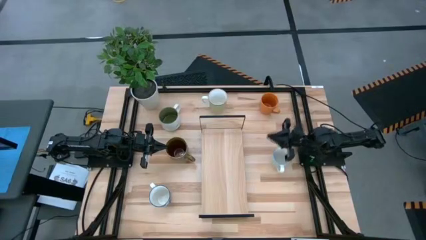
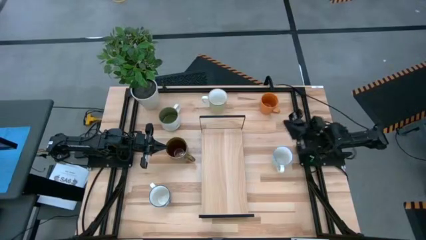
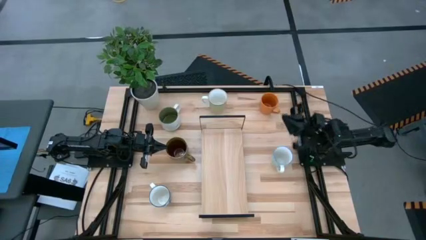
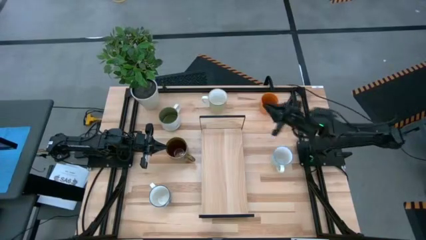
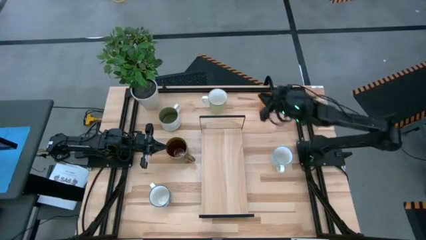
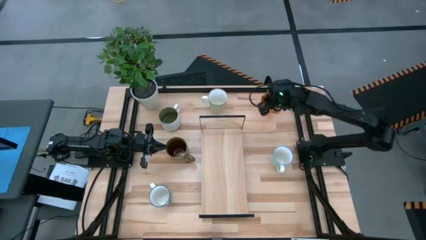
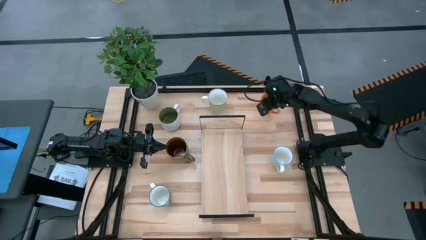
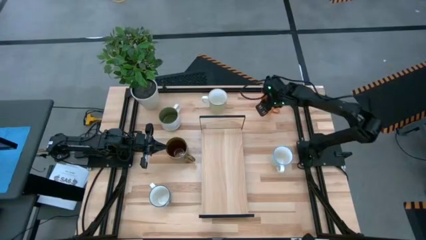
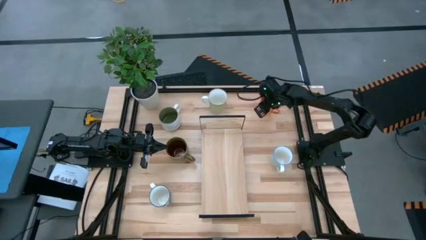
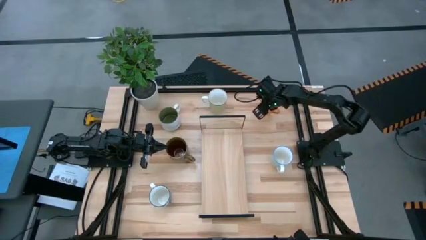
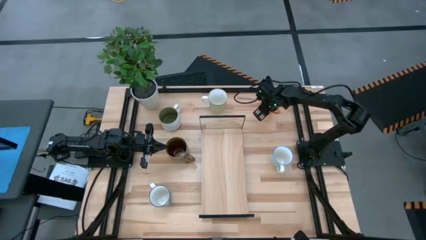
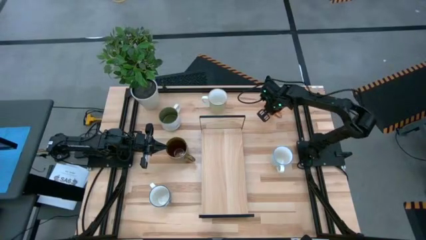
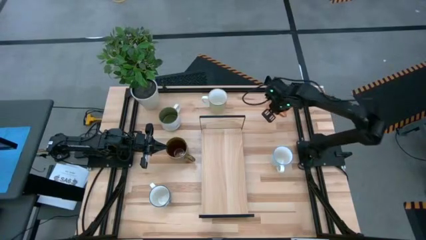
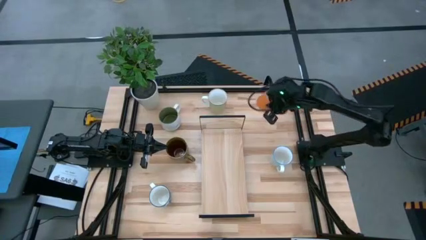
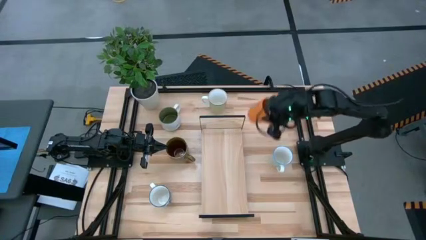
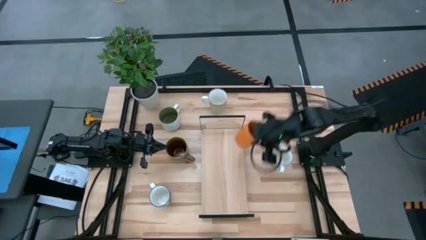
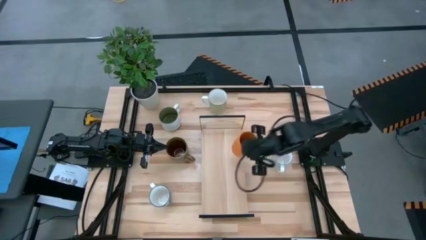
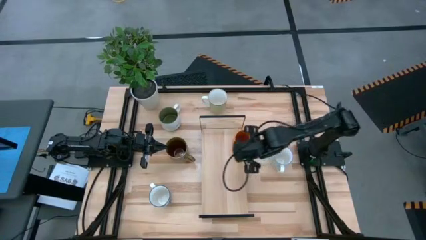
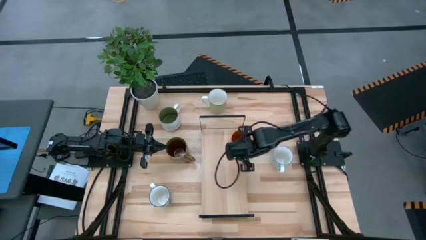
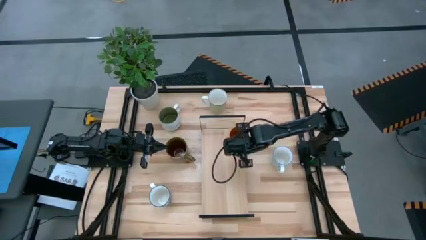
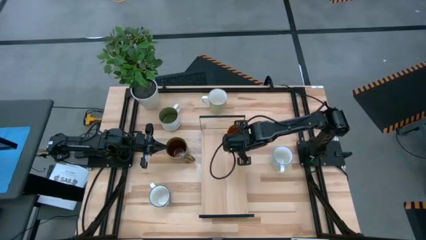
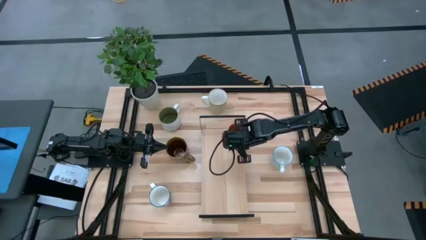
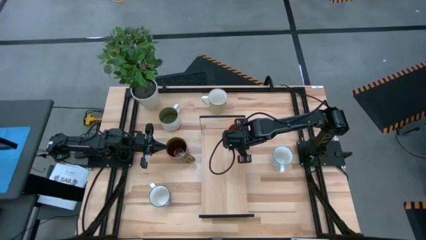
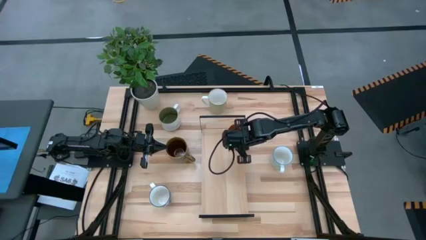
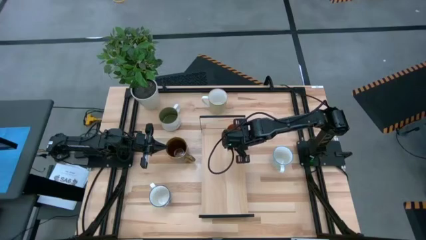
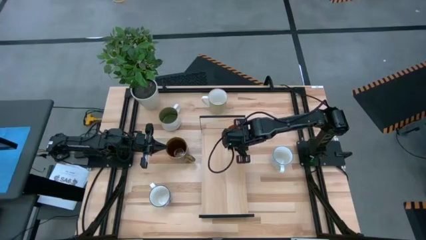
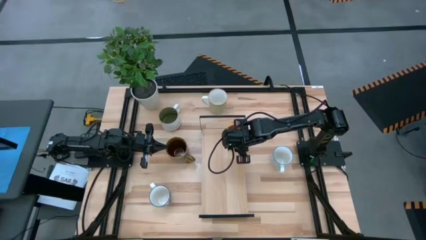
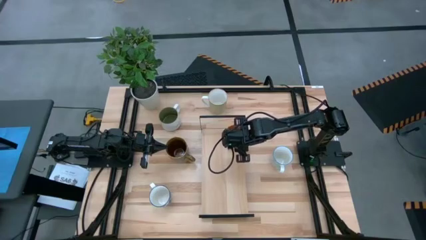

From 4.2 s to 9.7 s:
Task: Place coffee mugs
Put the orange mug on the shelf

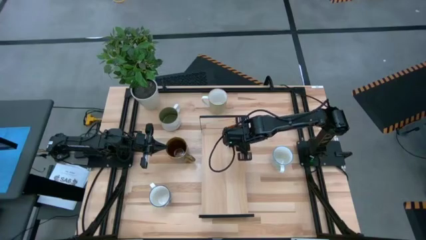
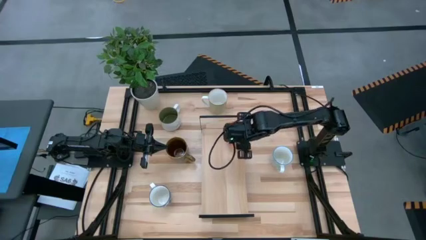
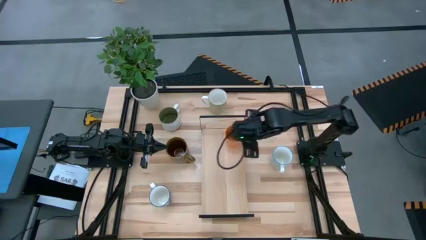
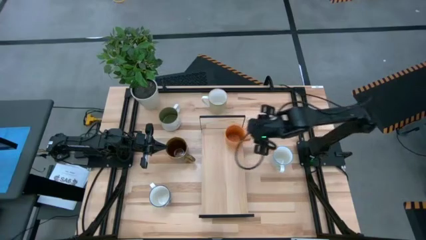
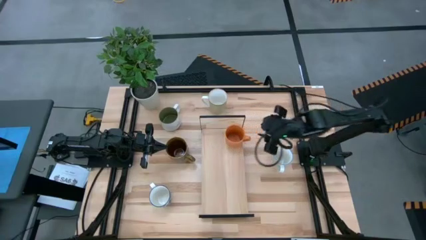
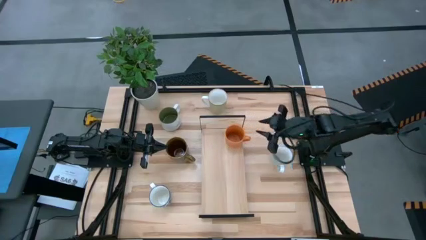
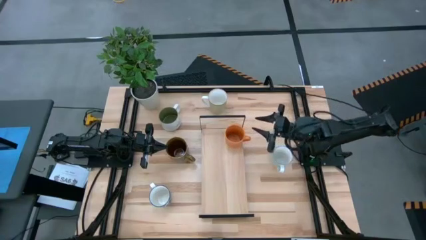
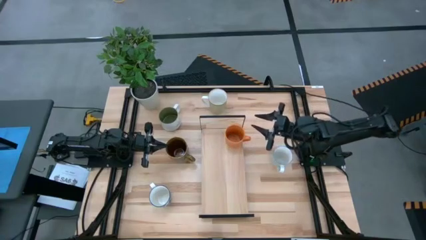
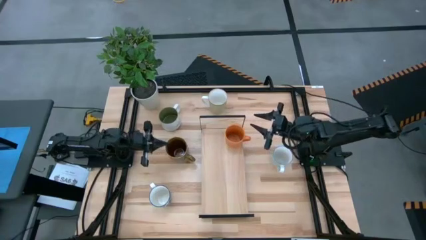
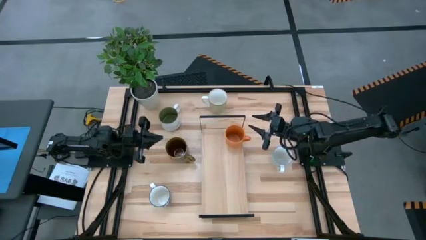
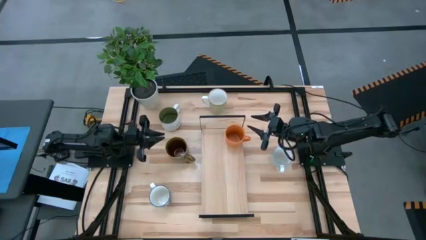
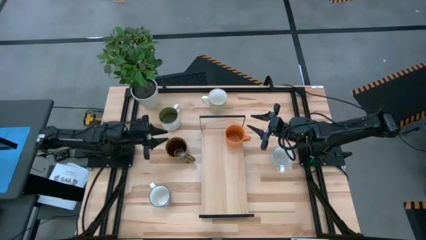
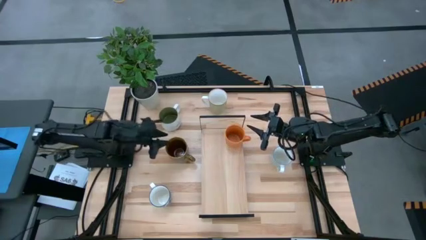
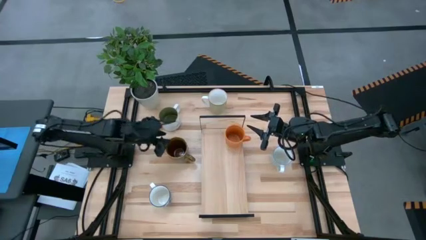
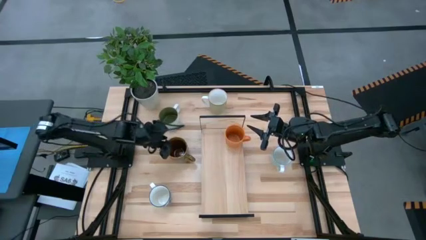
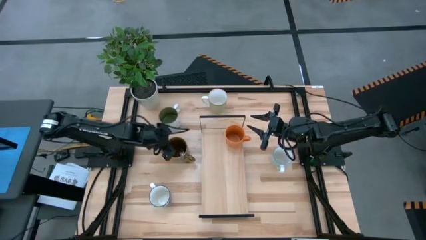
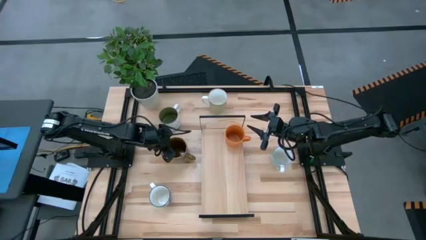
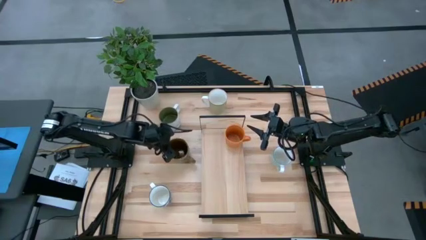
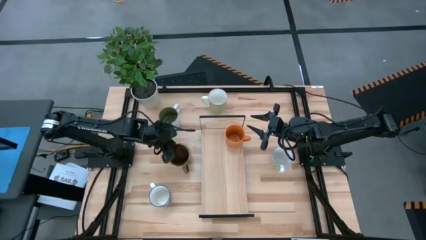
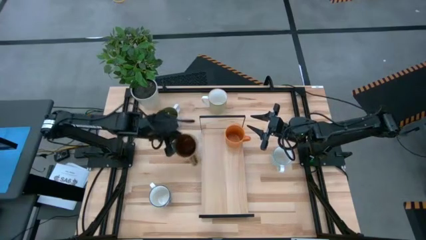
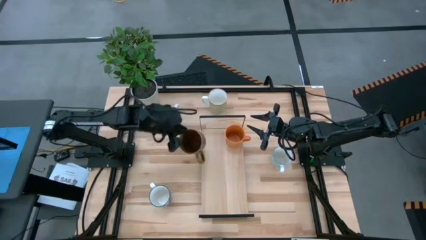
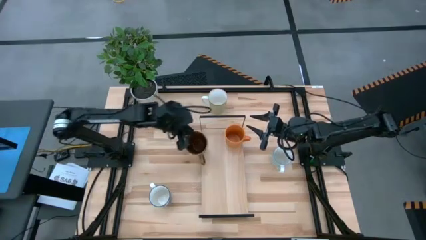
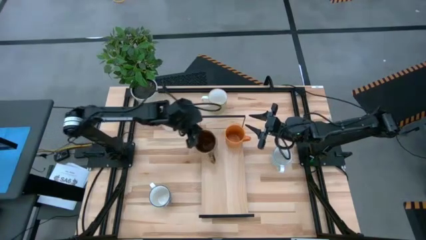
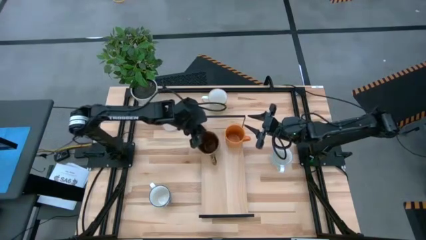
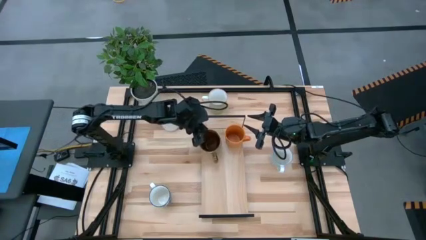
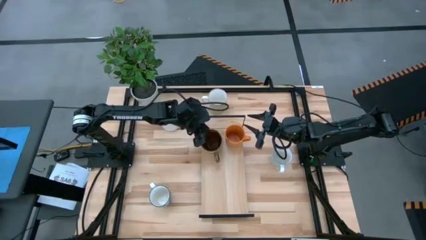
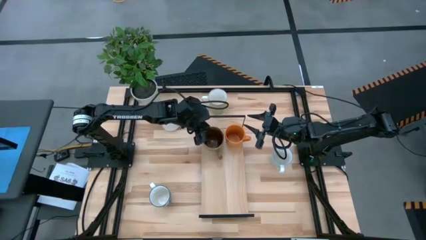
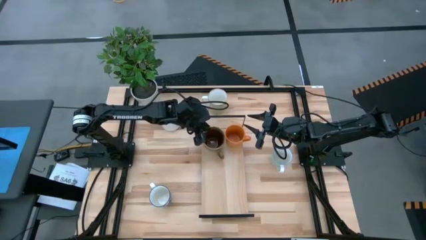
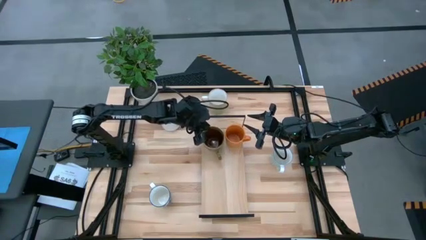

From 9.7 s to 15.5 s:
Put the dark green patterned mug on the shelf

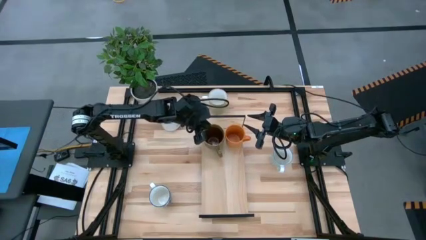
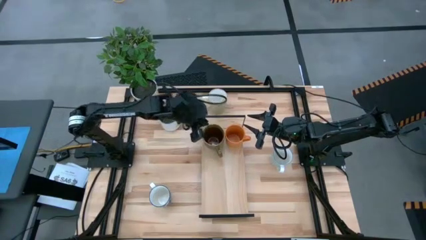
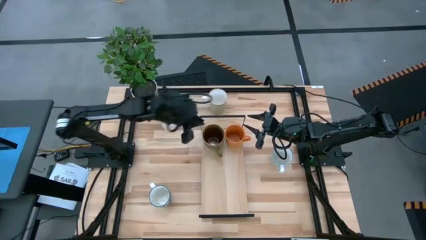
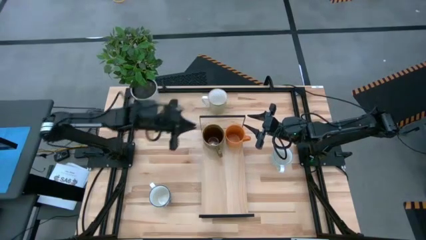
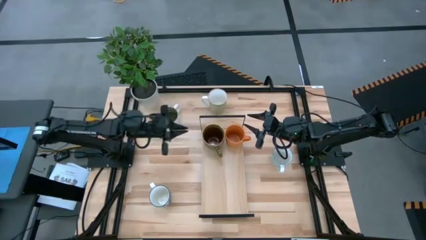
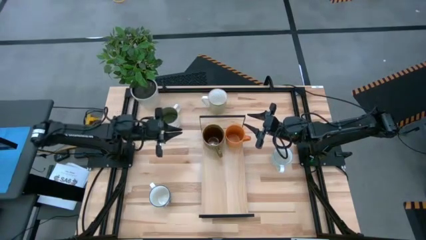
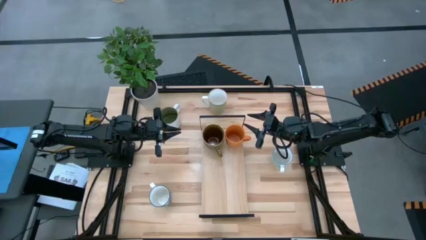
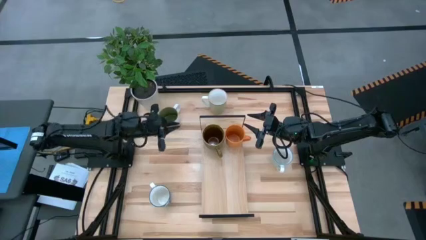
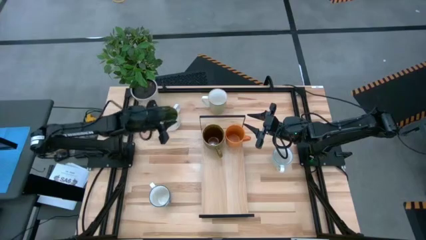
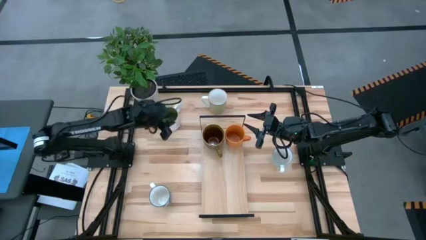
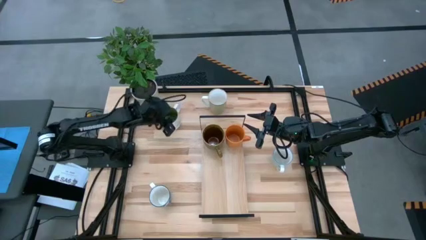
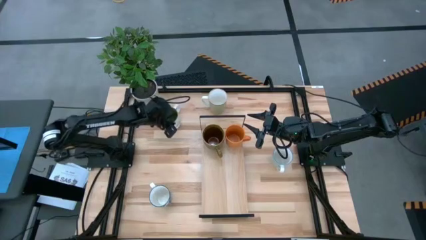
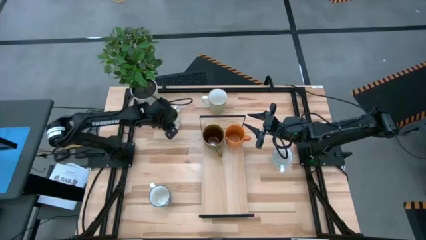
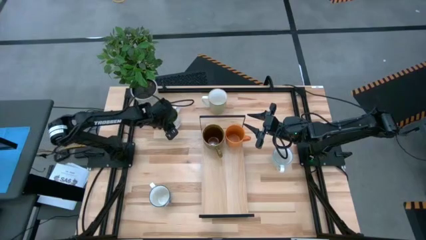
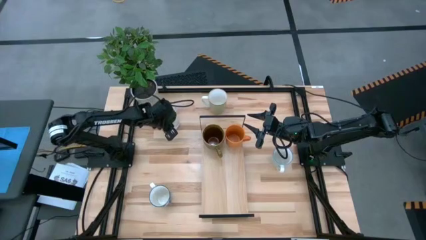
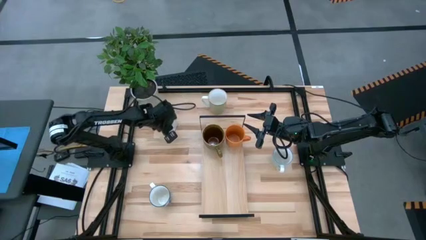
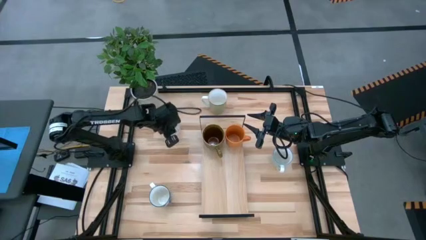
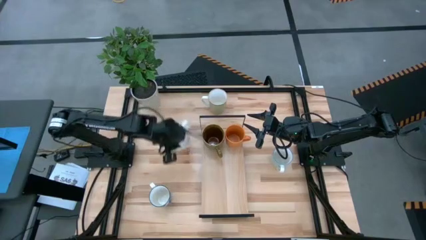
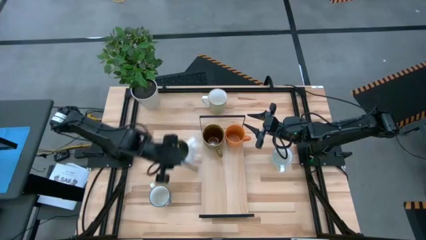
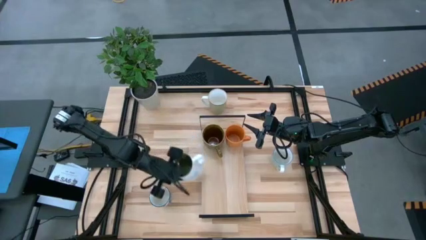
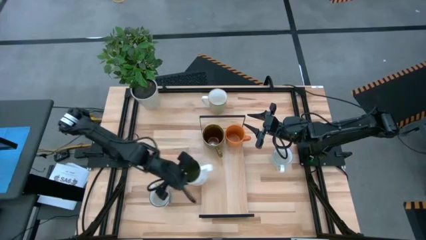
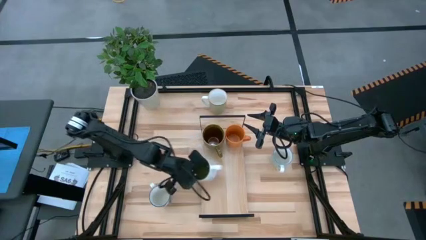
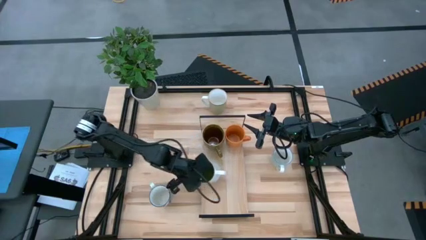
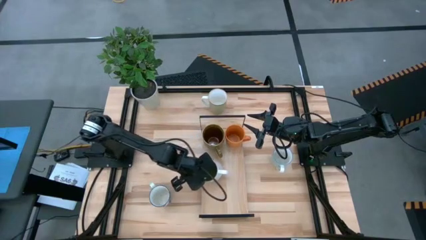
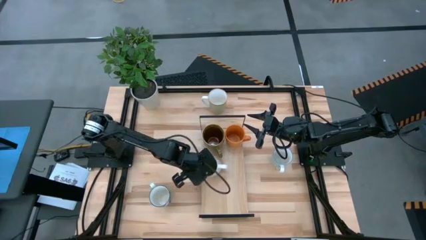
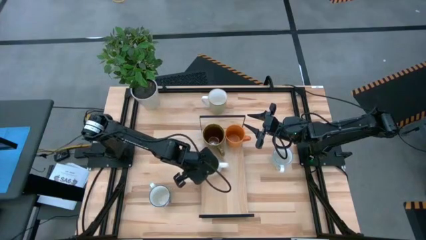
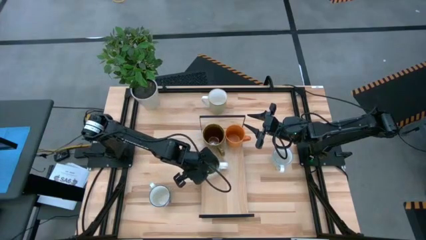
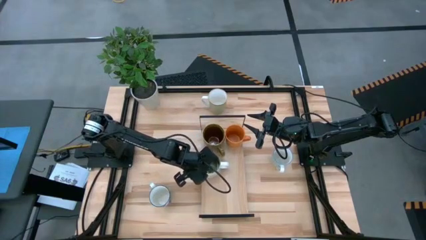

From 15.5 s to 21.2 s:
Put the white-green mug on the shelf

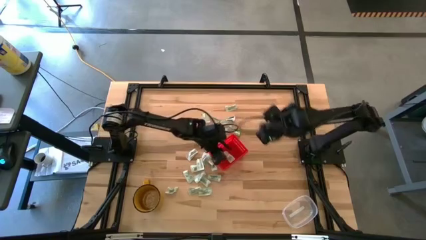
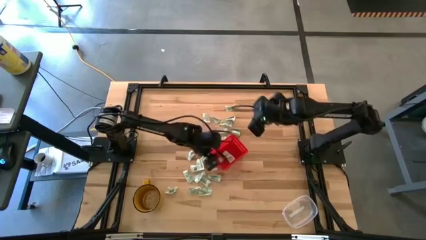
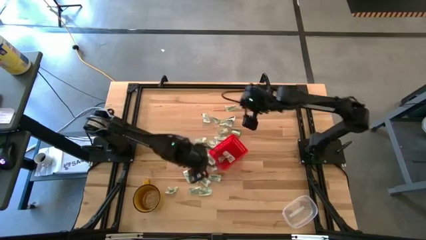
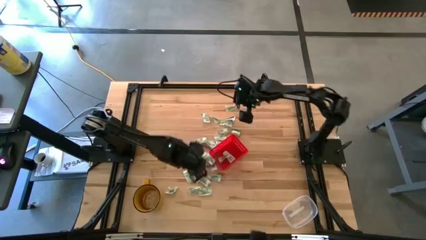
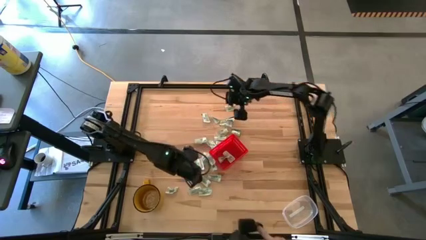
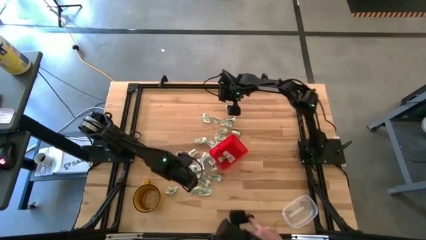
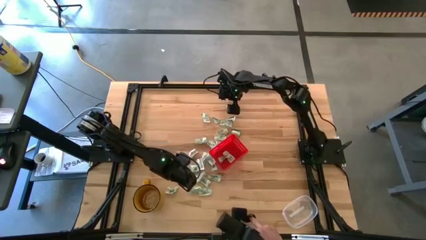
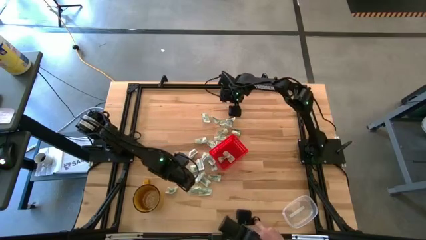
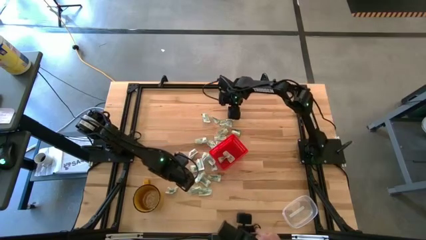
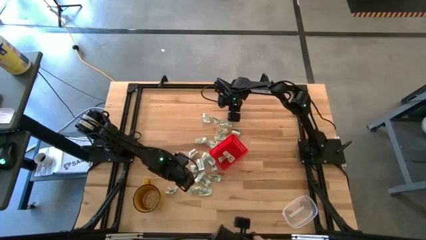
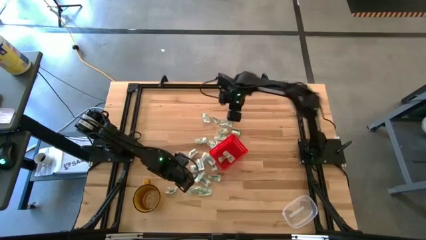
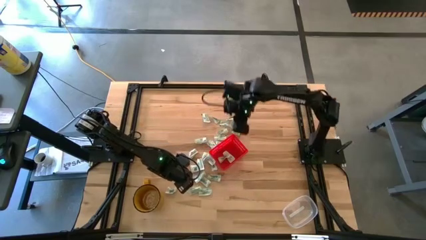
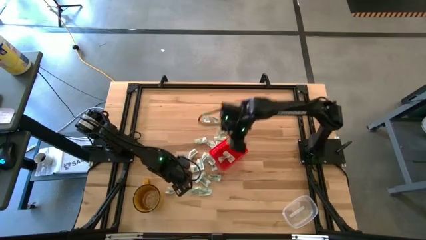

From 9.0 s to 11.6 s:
Task: Pick and place items into bin
Put the light green stevia packet into the red bin
